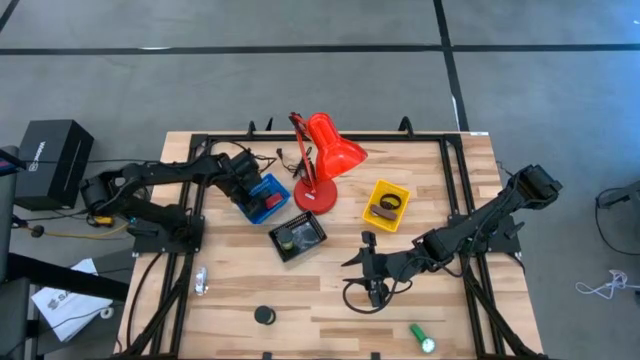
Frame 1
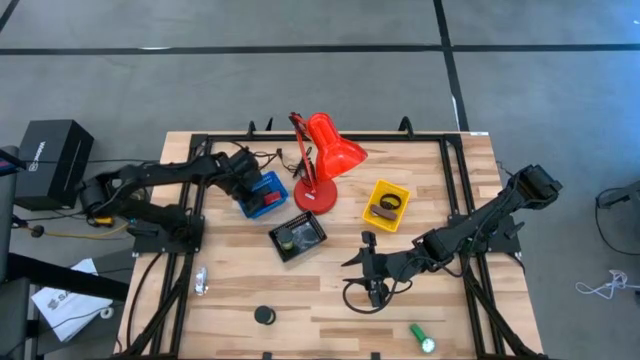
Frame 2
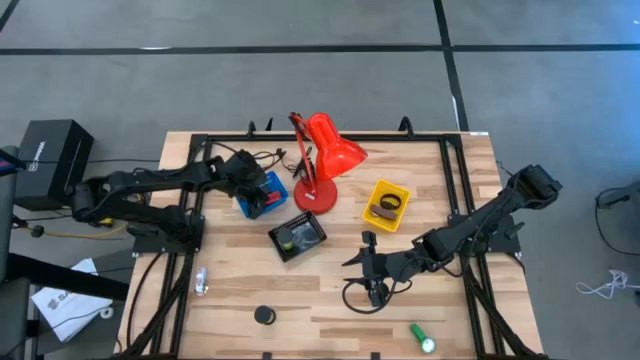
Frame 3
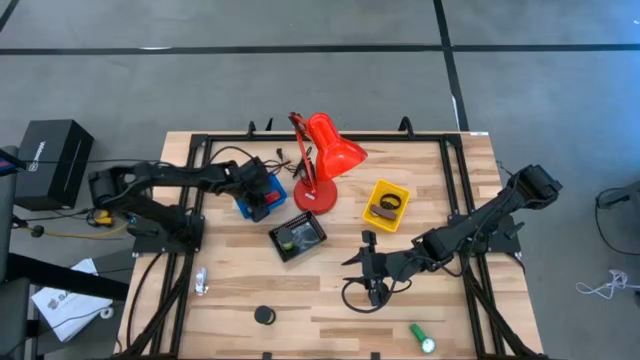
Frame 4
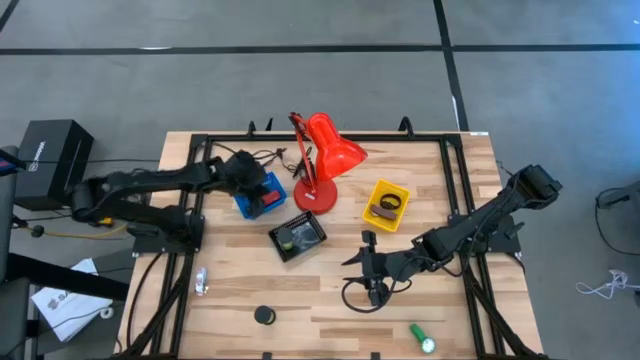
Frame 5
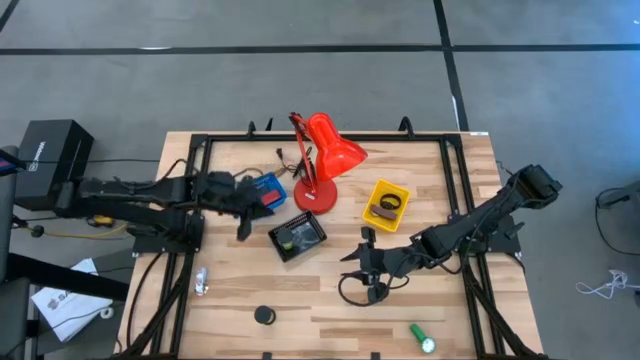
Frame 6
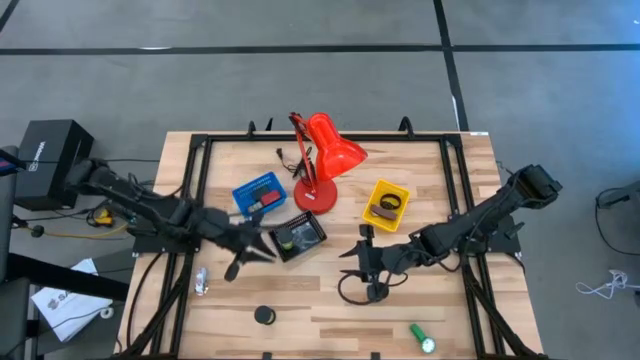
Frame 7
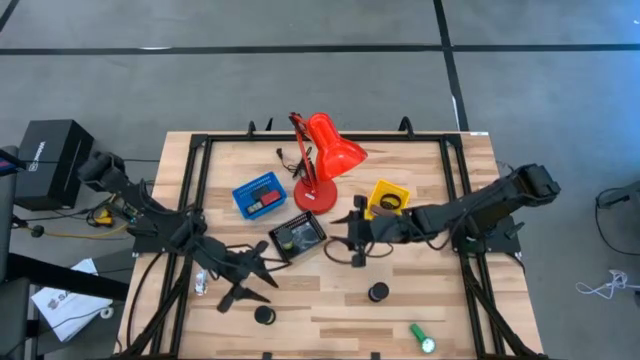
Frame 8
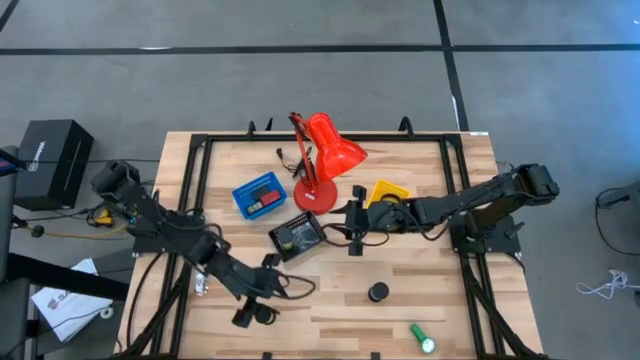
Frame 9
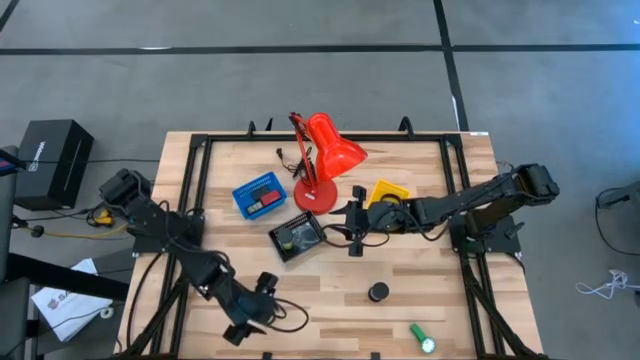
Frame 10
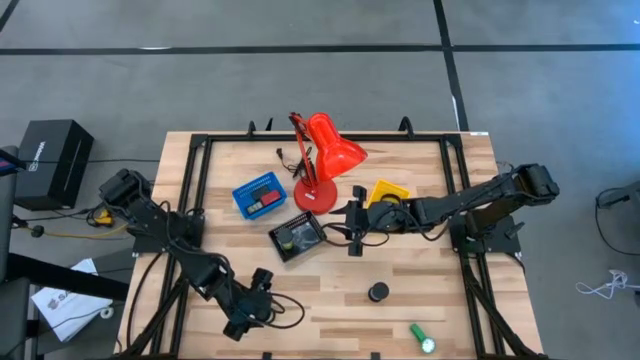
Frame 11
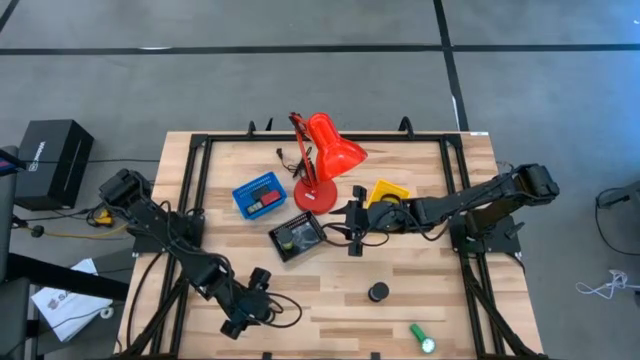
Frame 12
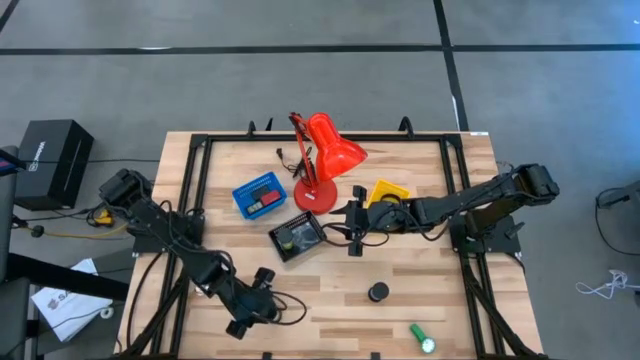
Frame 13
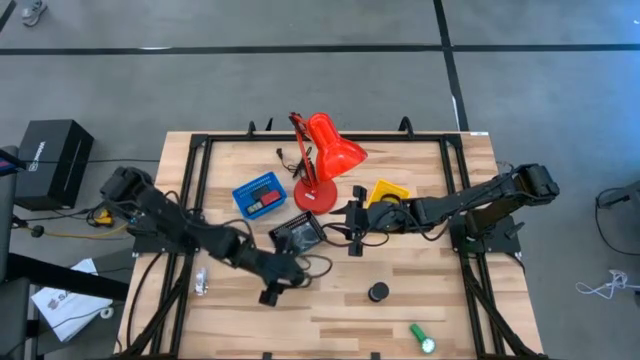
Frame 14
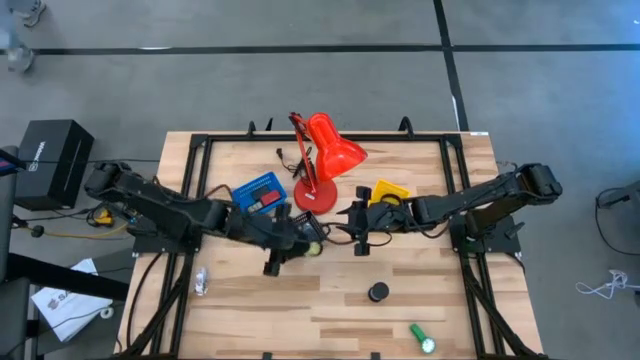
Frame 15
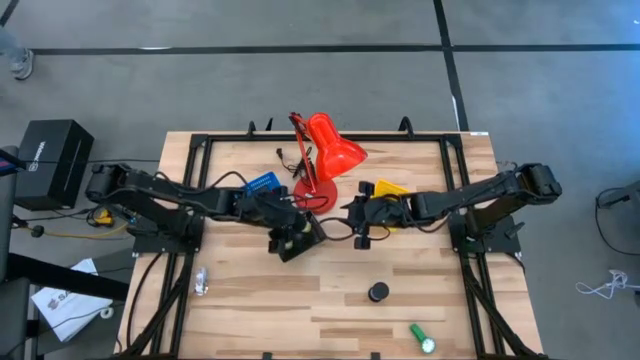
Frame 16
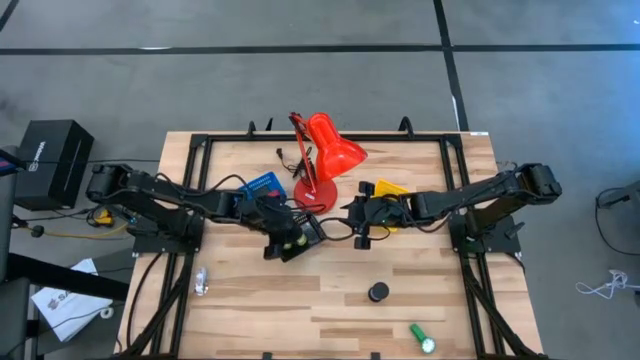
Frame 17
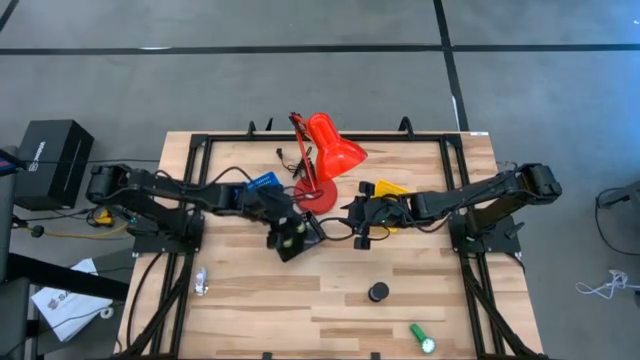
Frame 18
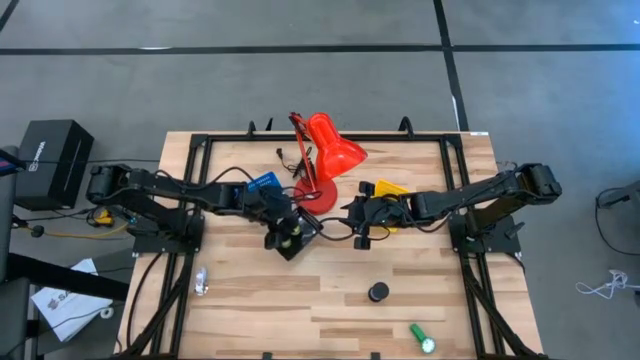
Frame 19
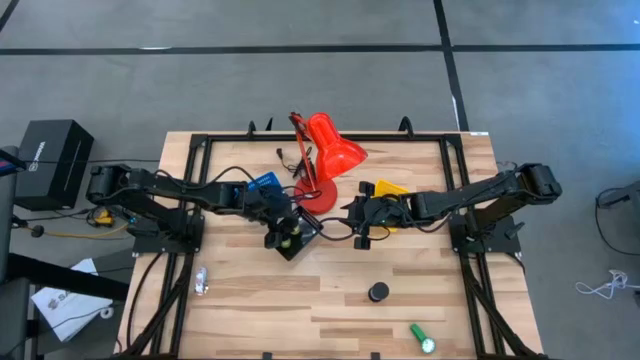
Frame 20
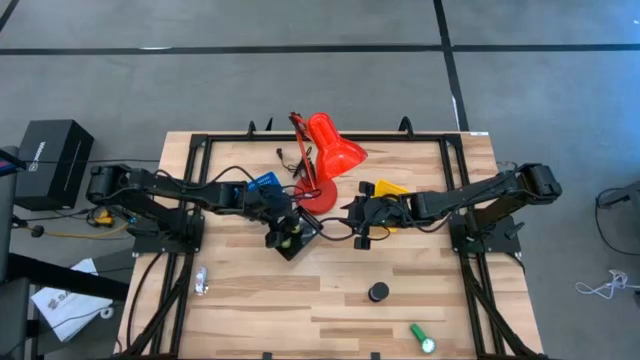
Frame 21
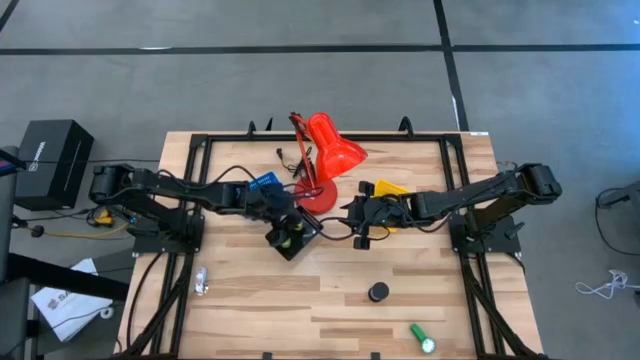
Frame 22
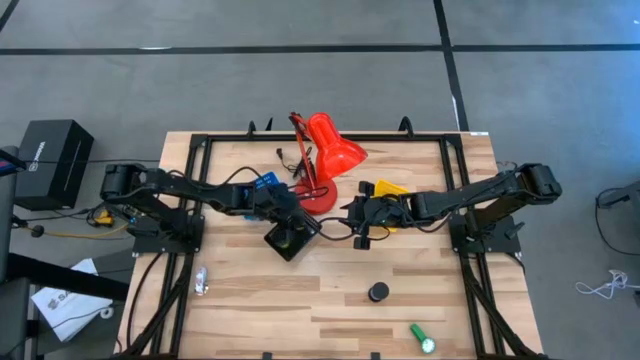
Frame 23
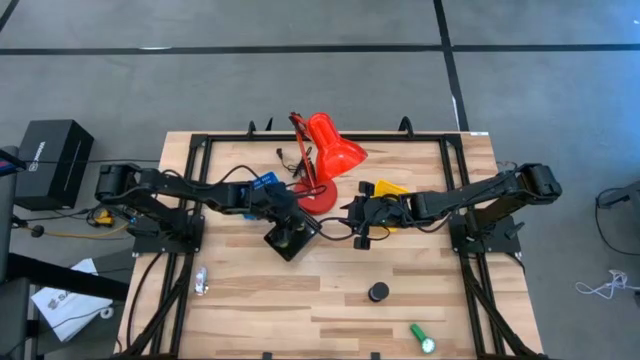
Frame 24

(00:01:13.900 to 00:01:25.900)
Task: Pick & Place Office items
Put the green hourglass into the black bin

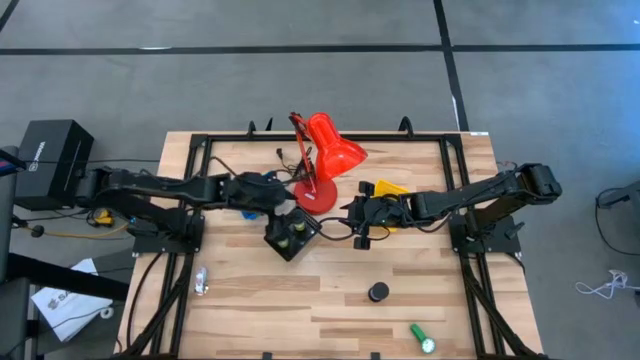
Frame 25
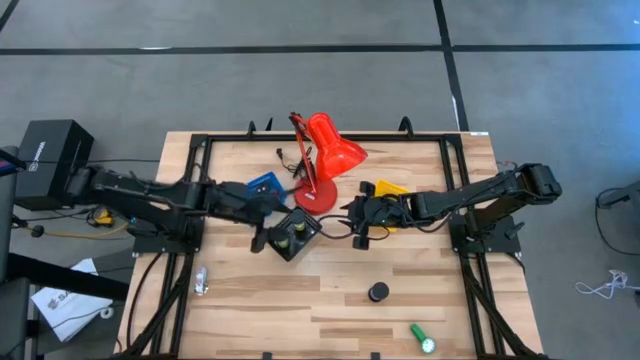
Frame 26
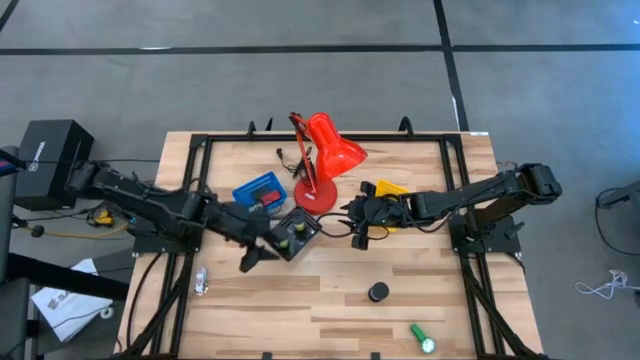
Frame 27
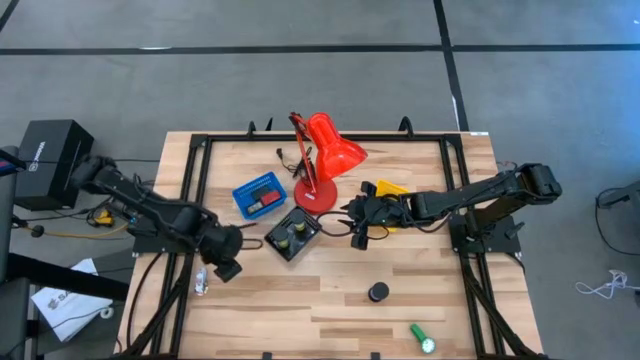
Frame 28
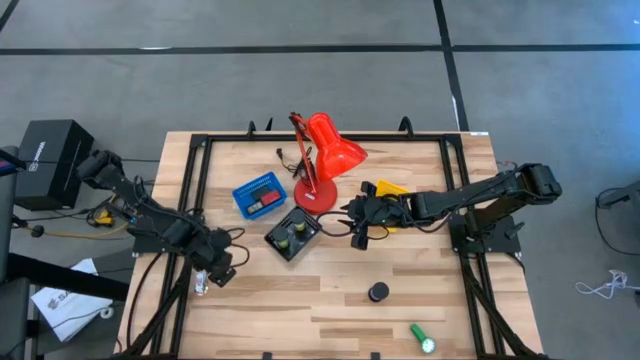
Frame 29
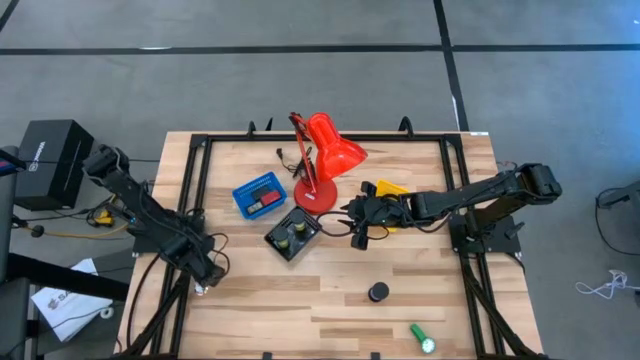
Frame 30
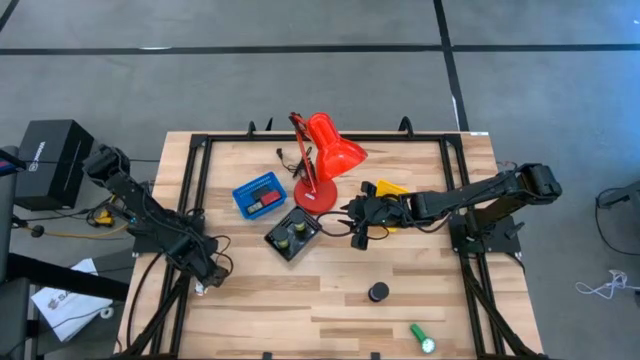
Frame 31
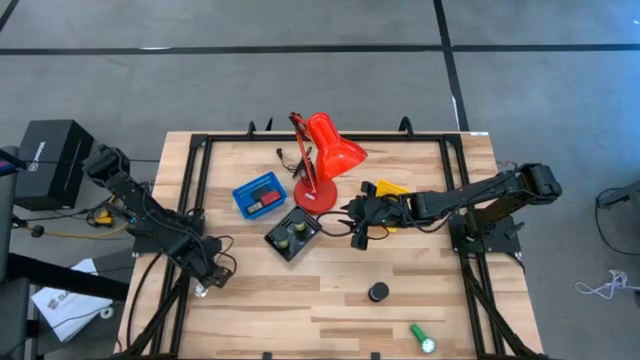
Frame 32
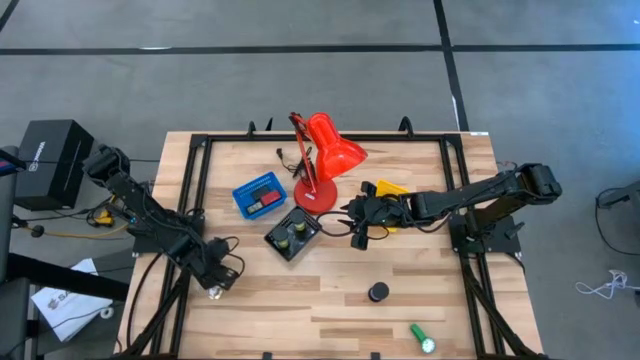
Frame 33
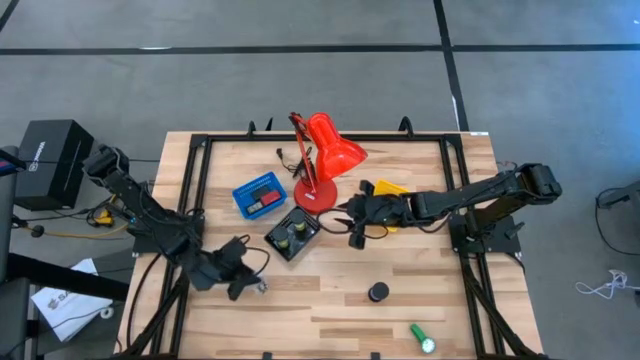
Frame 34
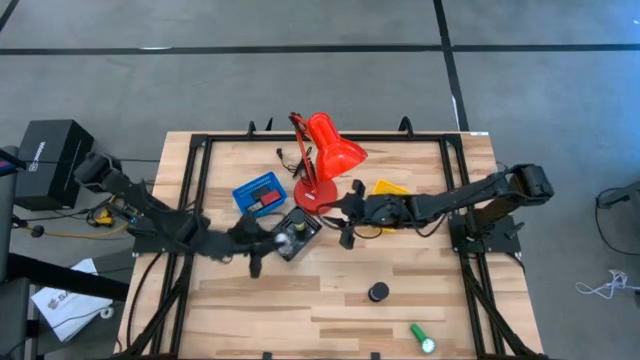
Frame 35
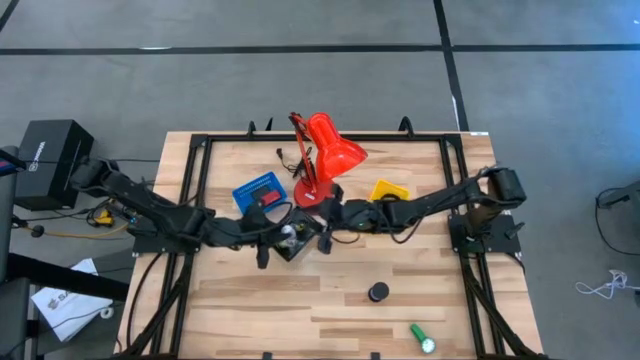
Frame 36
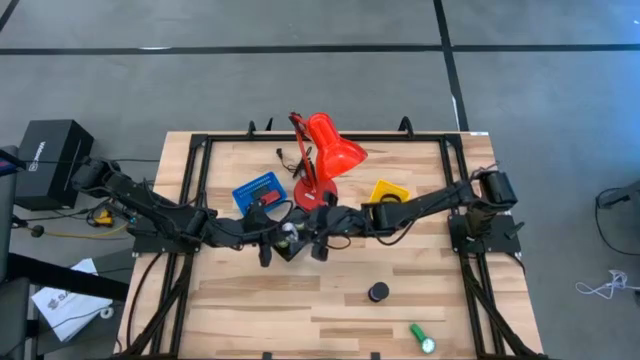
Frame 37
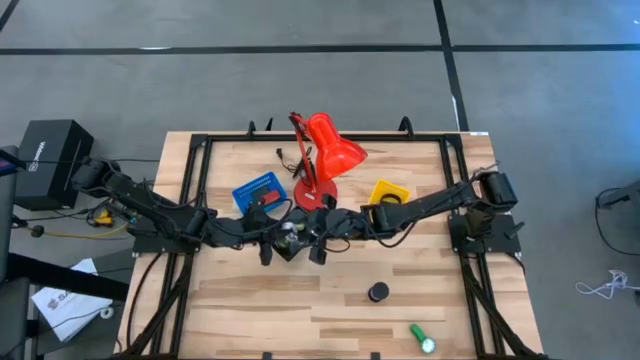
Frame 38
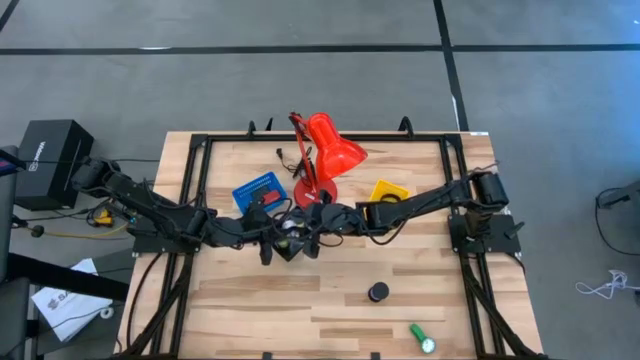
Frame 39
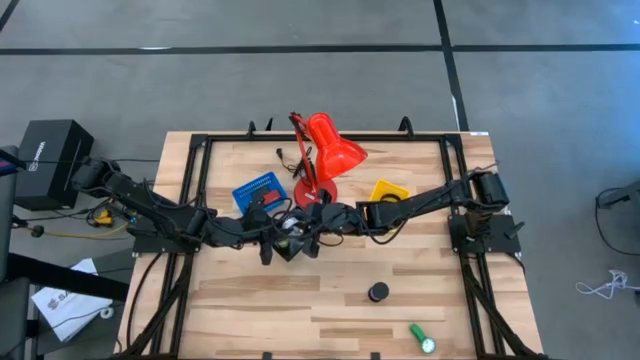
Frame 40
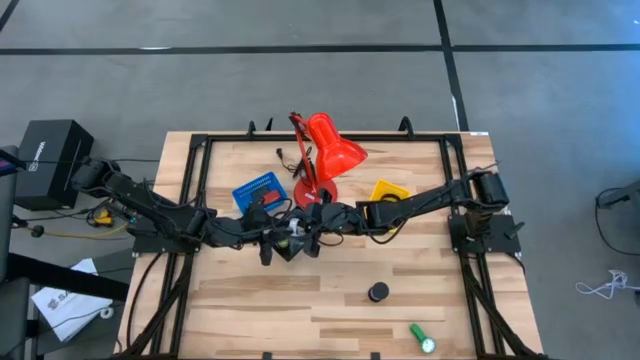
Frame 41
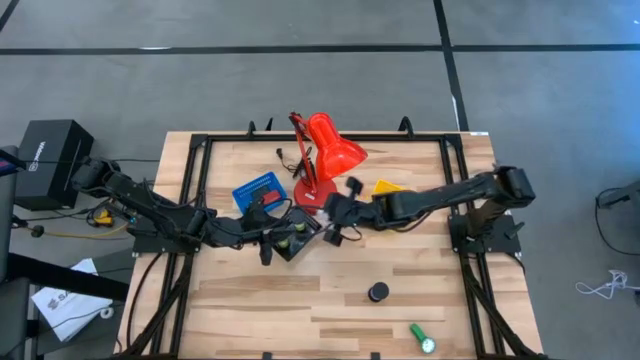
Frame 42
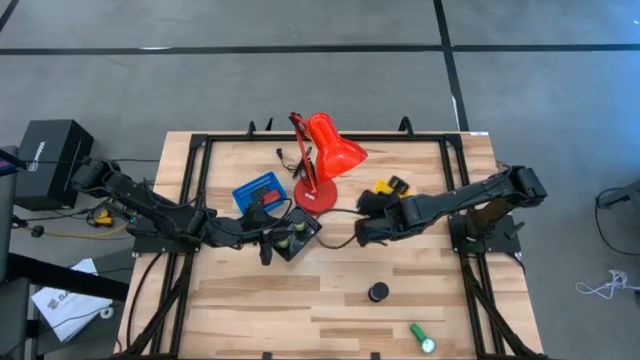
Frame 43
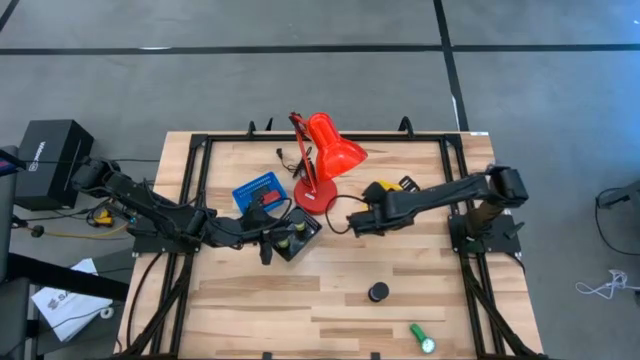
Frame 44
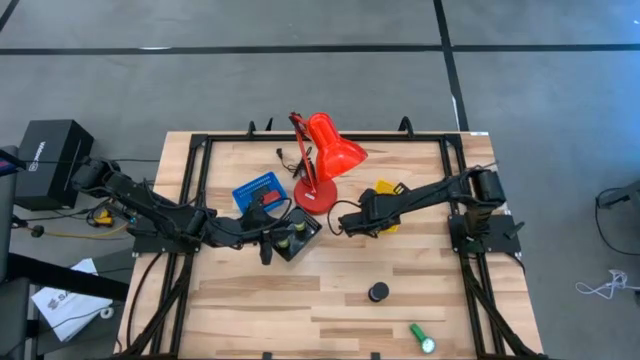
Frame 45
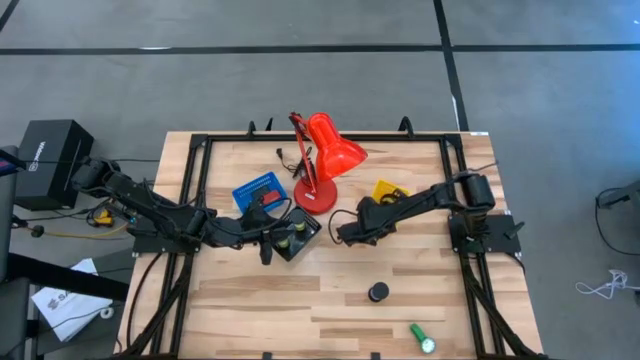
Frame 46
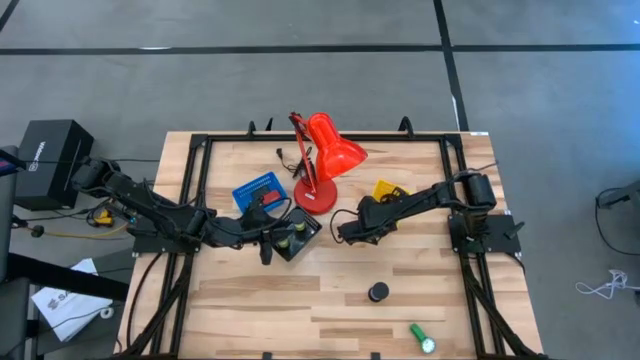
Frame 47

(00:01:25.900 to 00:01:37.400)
Put the white watch into the yellow bin
